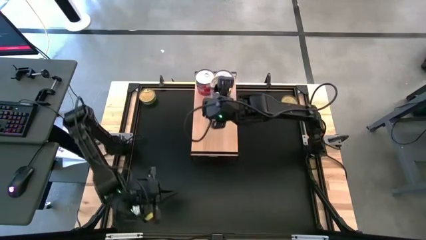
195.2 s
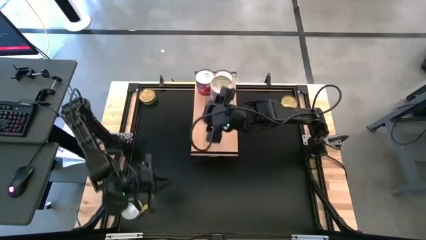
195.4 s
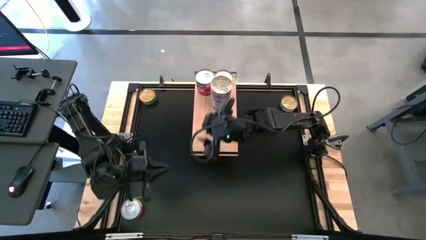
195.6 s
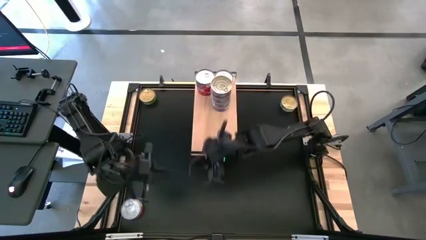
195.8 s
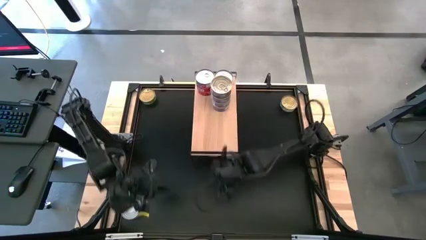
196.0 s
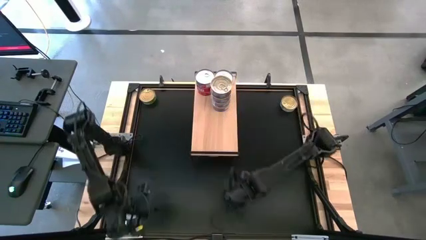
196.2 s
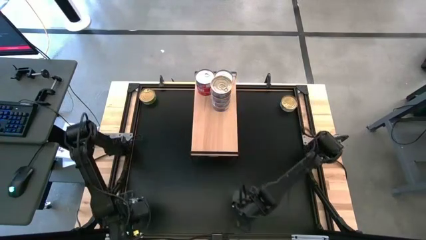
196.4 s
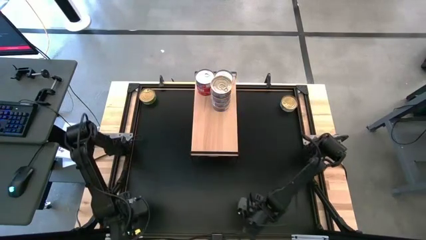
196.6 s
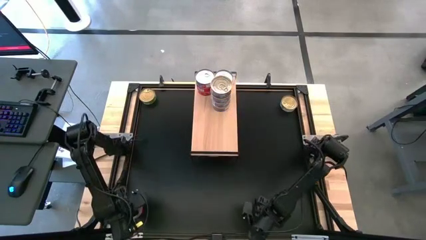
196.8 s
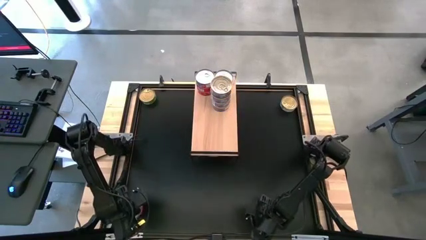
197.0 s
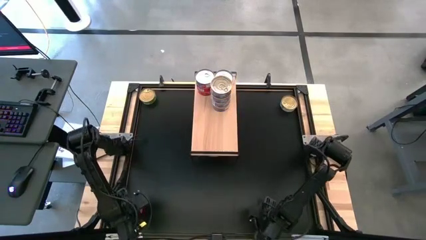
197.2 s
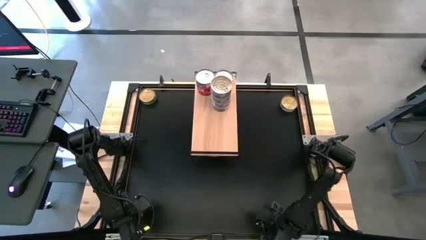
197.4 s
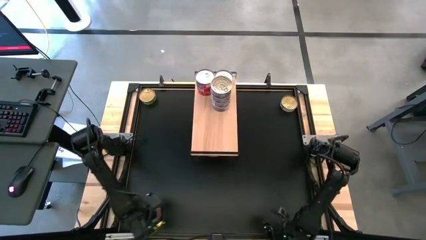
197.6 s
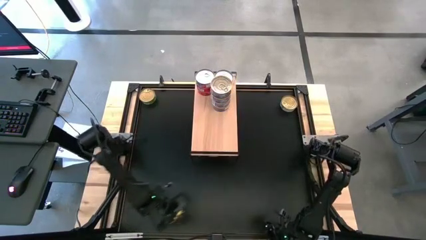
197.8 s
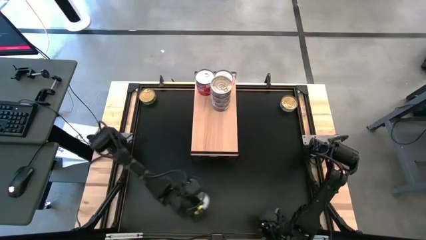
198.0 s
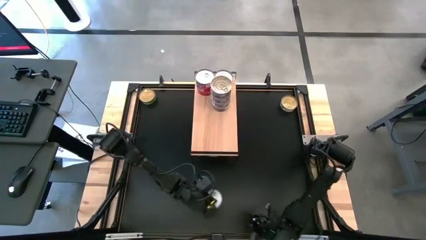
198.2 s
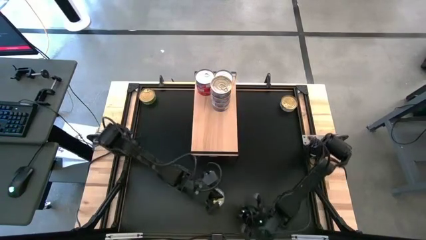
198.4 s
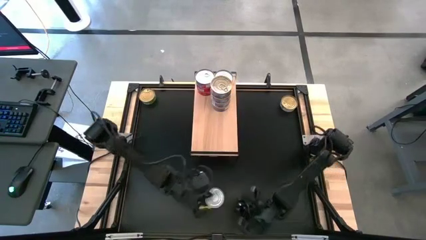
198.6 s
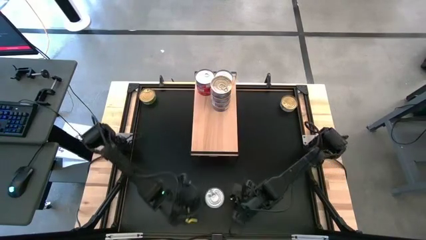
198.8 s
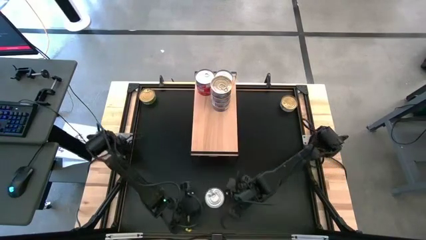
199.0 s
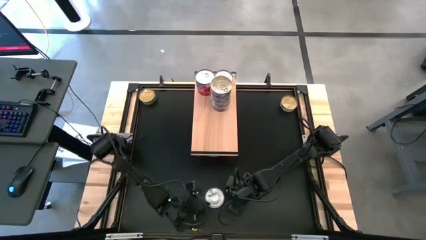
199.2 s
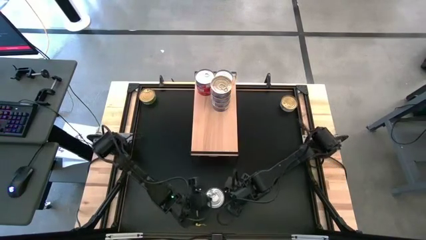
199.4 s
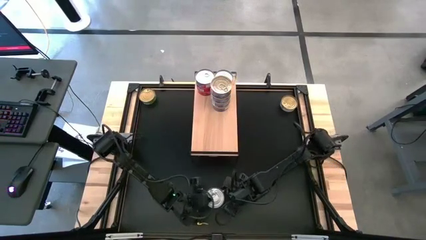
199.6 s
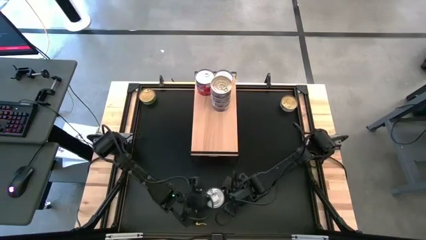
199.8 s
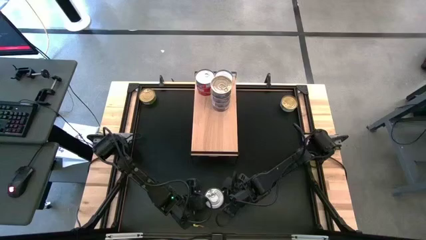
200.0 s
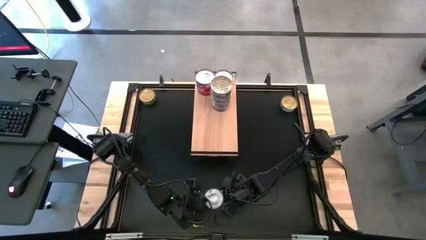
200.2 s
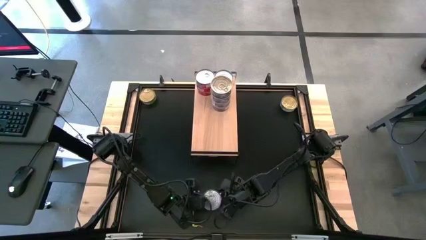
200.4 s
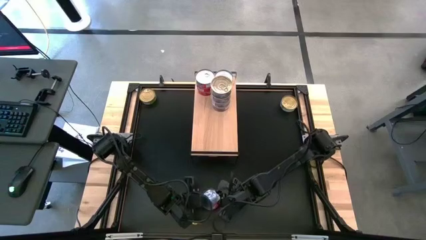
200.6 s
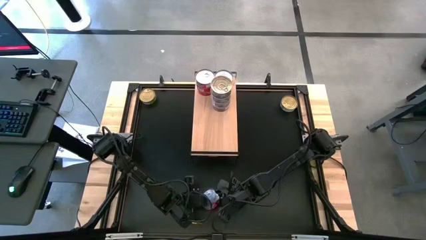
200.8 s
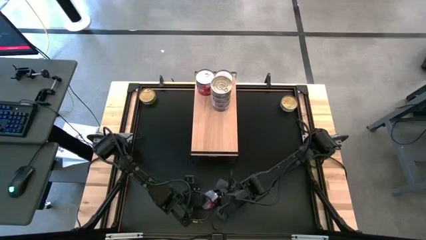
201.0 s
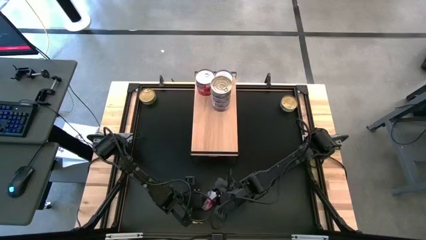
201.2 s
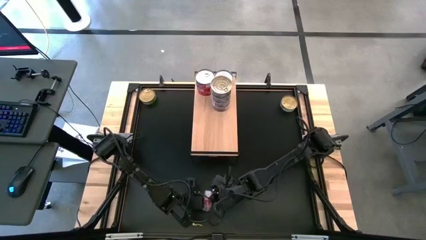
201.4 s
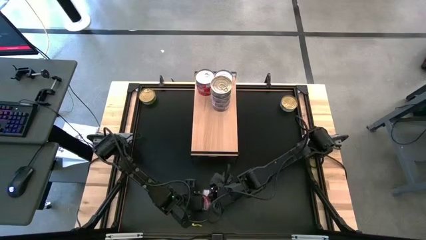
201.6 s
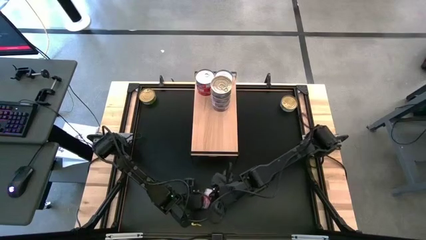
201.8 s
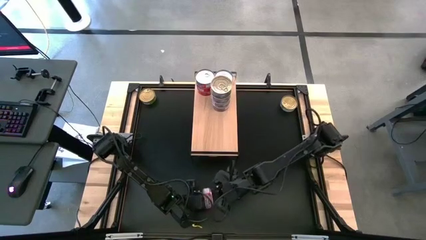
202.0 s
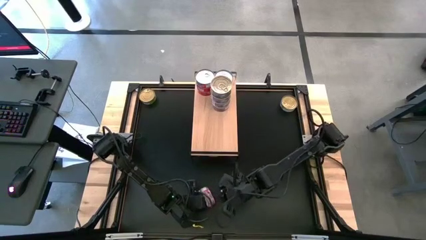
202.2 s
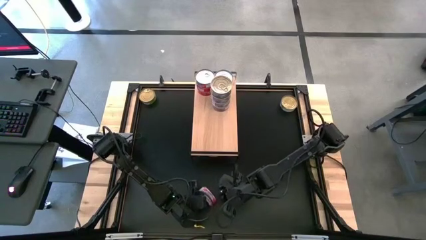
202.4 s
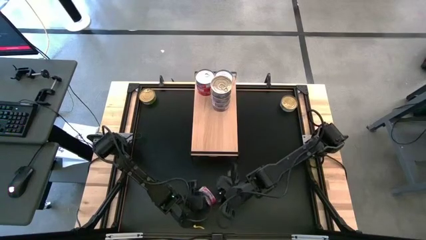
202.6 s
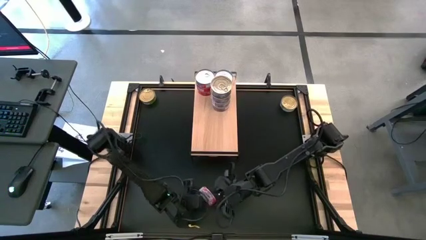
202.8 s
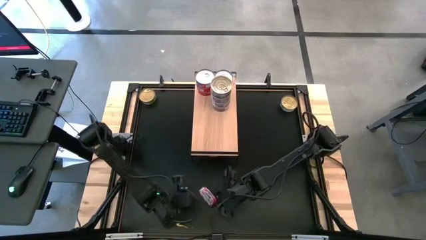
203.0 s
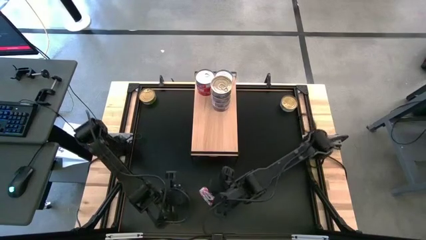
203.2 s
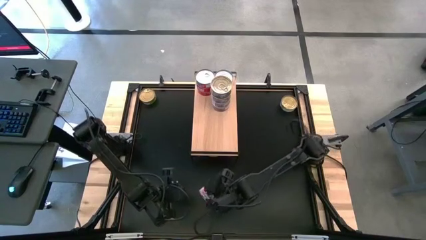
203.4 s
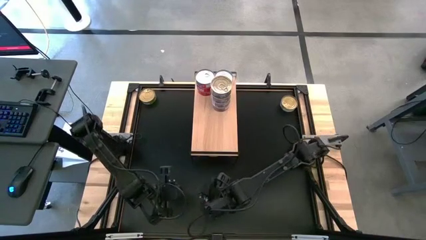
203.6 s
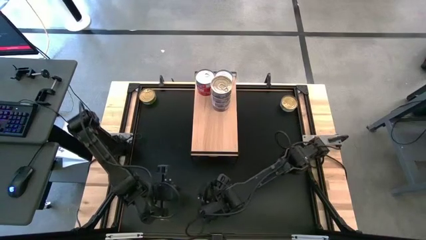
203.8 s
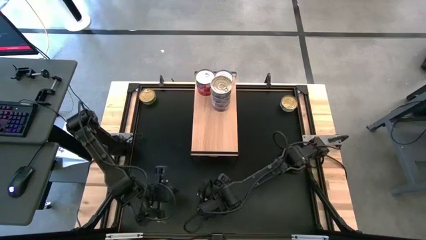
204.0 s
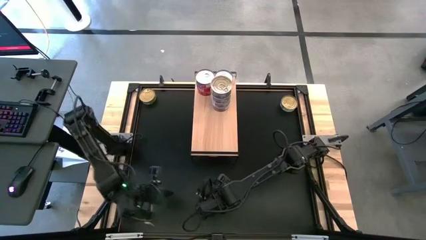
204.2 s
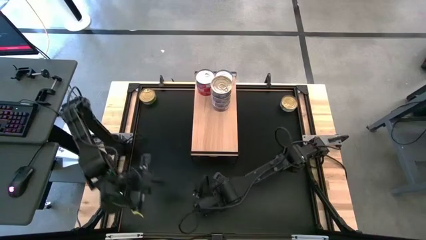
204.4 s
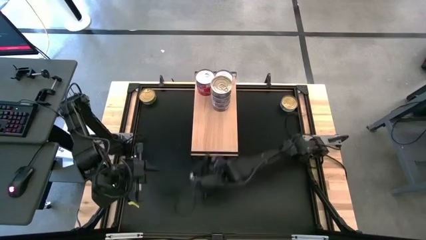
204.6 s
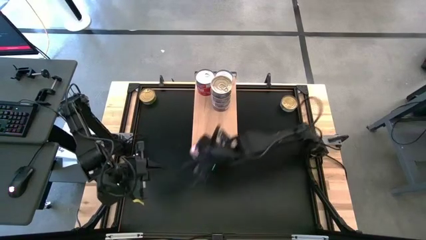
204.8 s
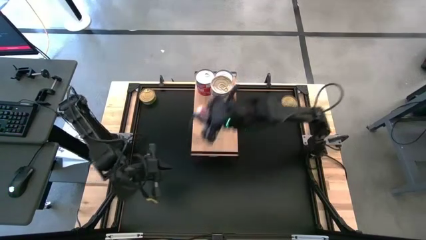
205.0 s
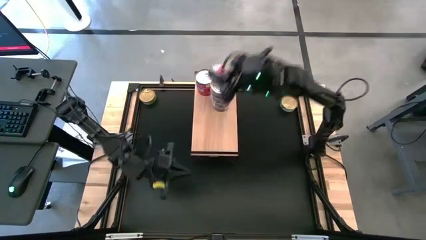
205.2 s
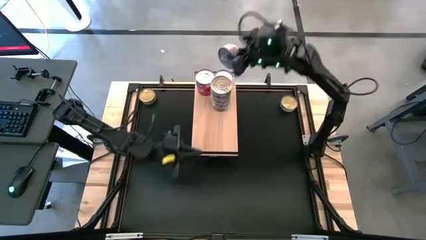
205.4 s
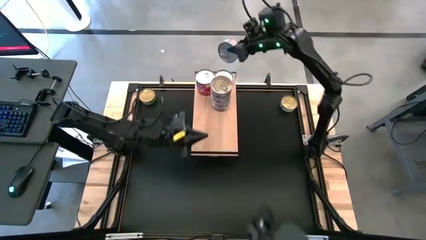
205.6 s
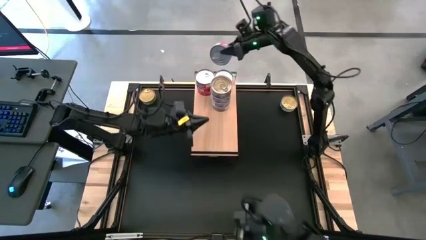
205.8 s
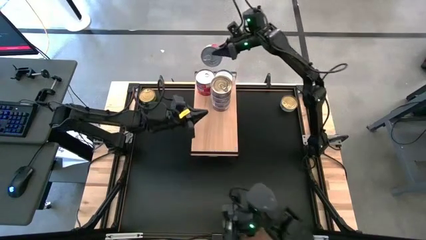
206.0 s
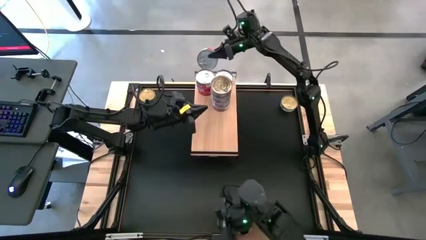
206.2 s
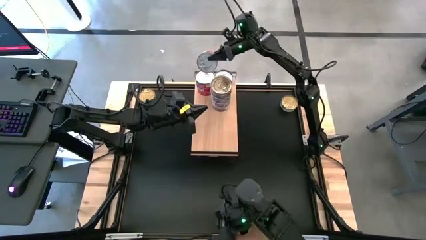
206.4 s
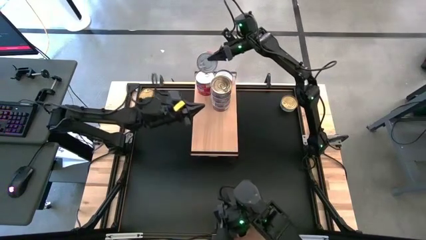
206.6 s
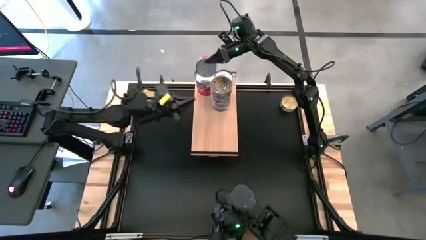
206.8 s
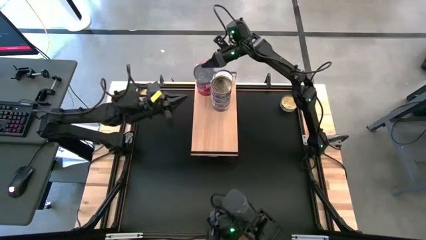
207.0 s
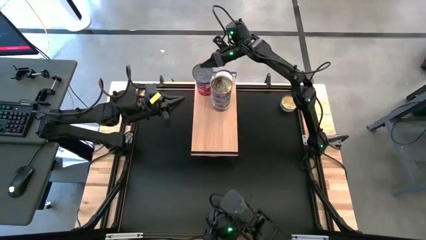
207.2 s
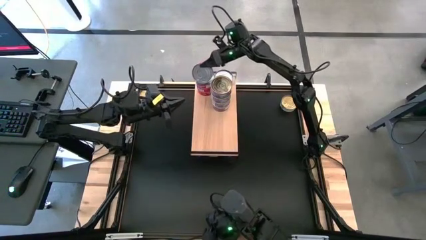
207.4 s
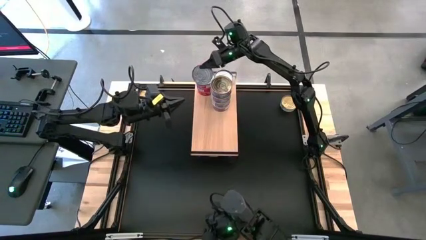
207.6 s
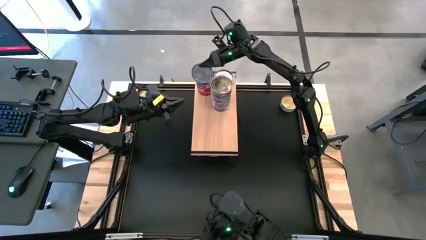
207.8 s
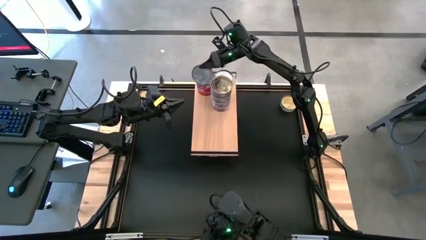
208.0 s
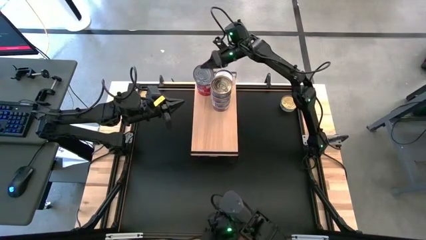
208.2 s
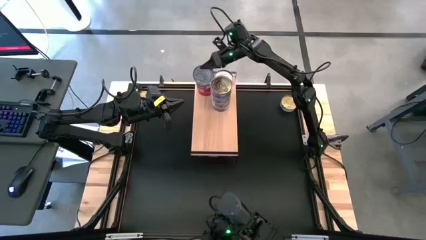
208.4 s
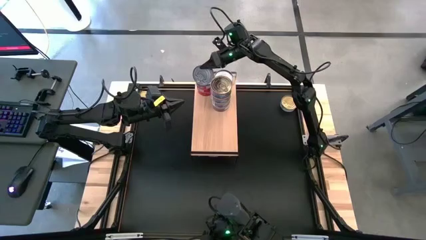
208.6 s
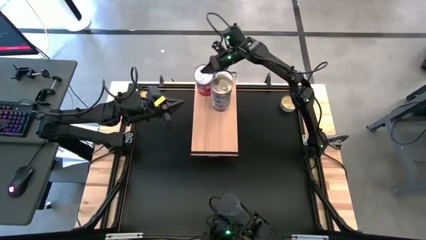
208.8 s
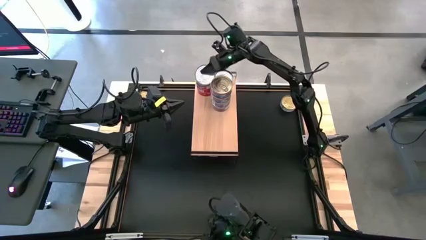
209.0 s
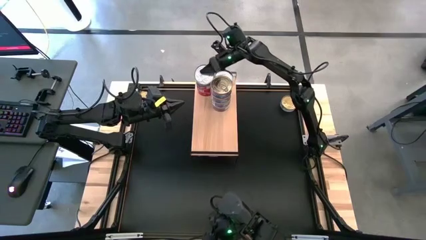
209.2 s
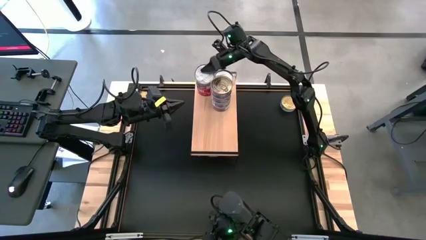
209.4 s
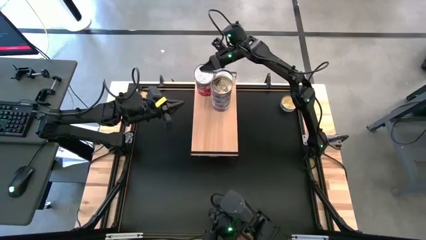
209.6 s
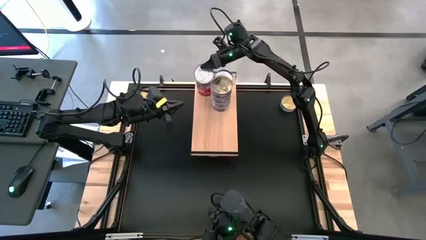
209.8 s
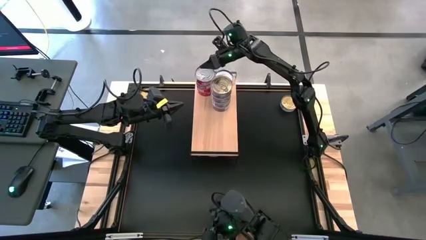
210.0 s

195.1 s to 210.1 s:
Task: Stack canned seafood by type on shelf
Stack the red tuna can on top of the red tuna can on the shelf
